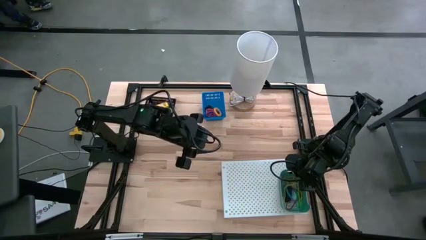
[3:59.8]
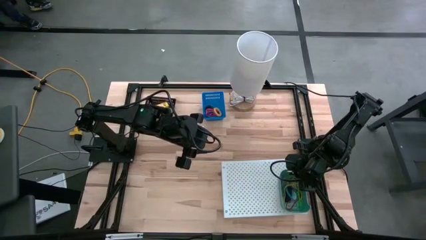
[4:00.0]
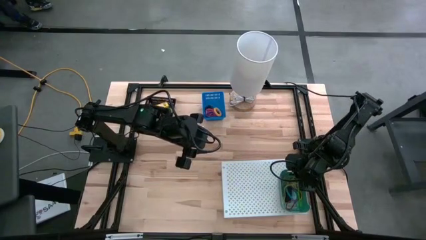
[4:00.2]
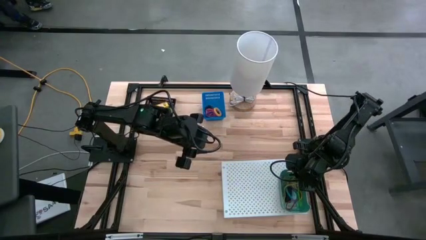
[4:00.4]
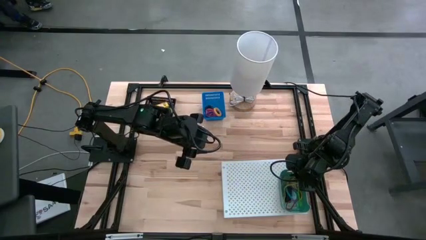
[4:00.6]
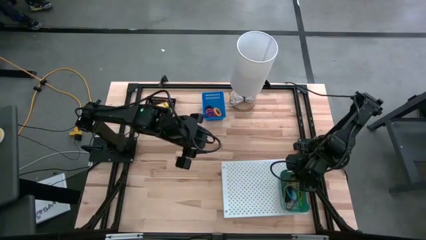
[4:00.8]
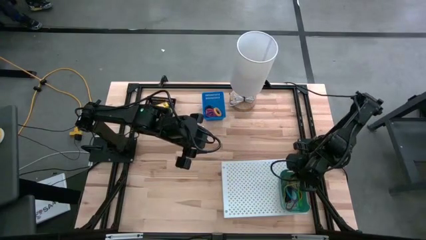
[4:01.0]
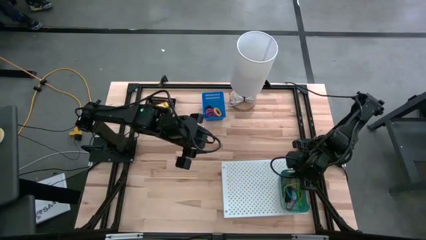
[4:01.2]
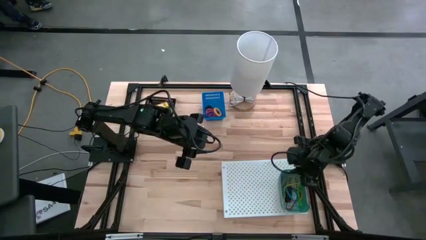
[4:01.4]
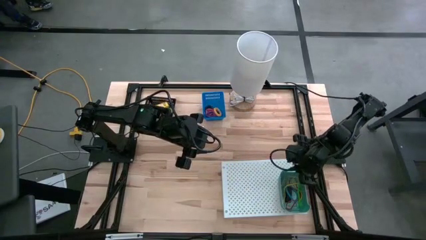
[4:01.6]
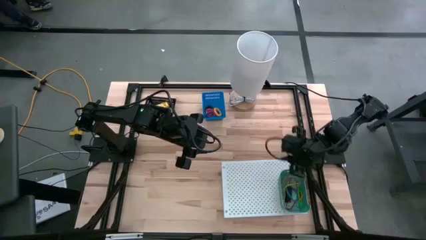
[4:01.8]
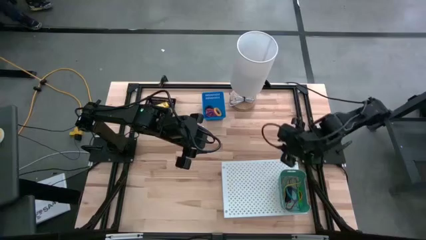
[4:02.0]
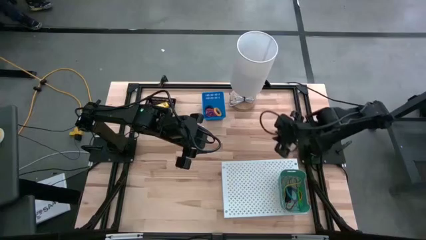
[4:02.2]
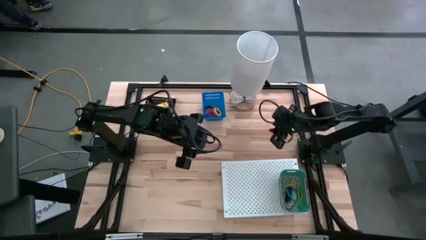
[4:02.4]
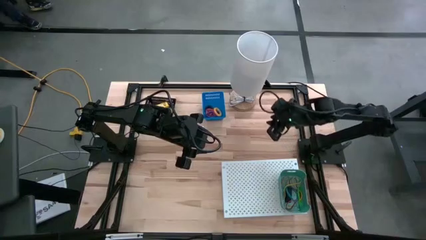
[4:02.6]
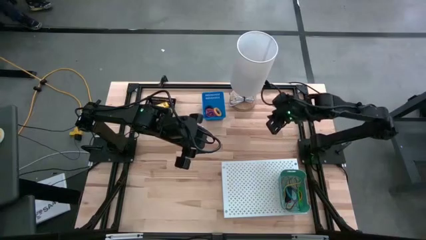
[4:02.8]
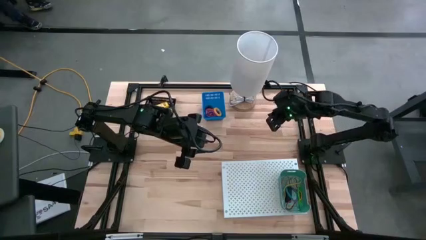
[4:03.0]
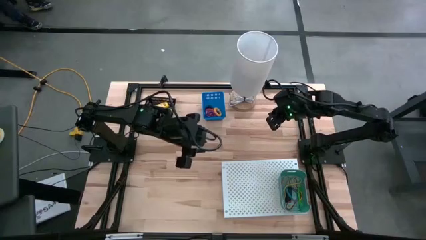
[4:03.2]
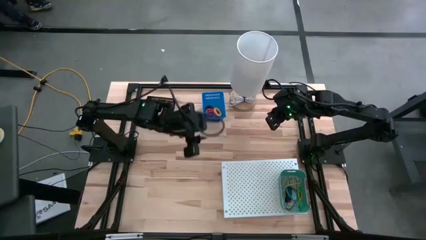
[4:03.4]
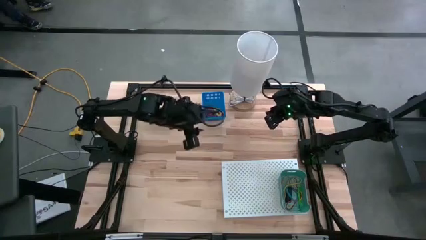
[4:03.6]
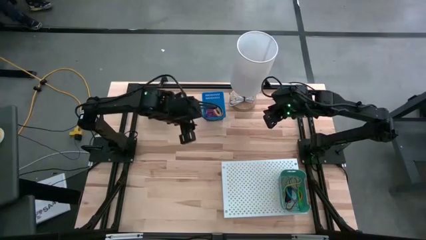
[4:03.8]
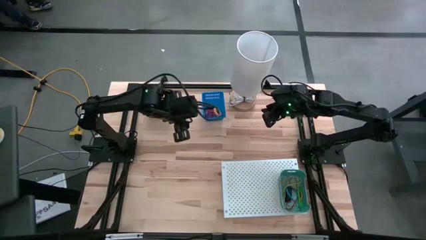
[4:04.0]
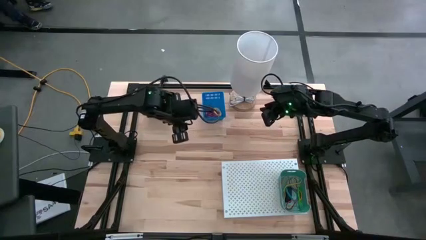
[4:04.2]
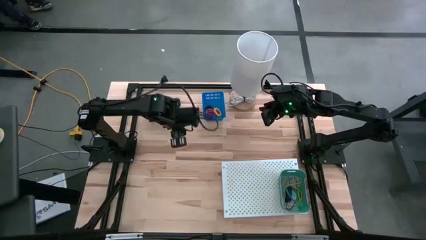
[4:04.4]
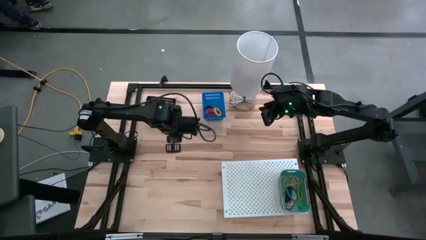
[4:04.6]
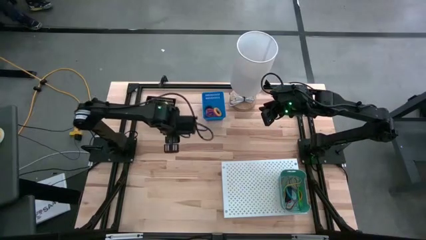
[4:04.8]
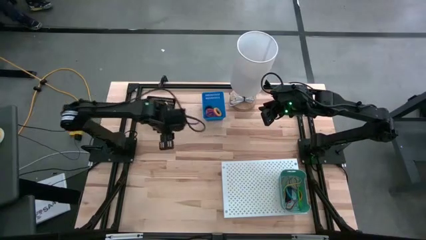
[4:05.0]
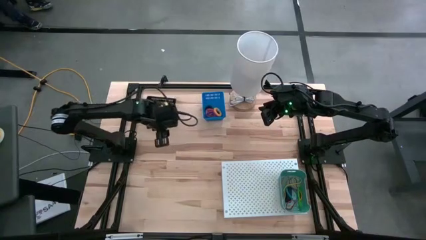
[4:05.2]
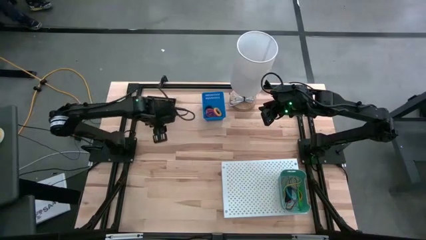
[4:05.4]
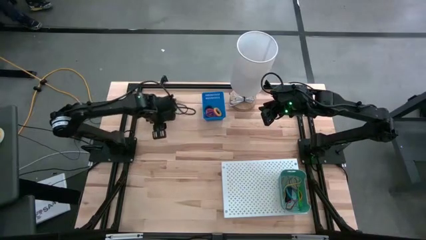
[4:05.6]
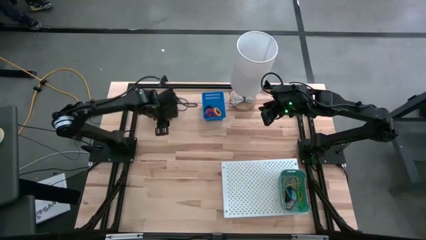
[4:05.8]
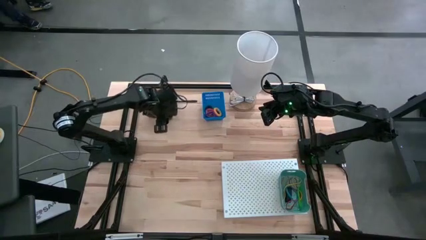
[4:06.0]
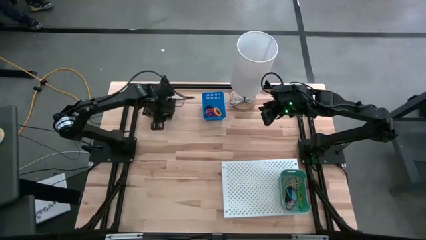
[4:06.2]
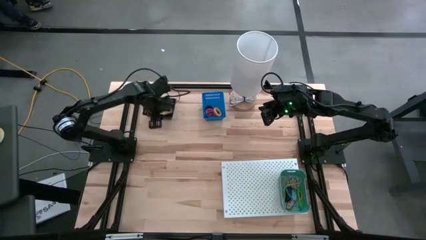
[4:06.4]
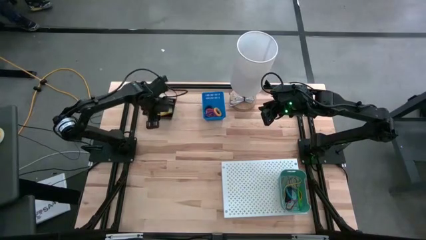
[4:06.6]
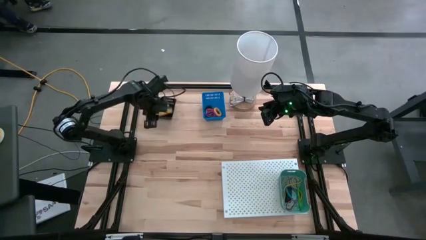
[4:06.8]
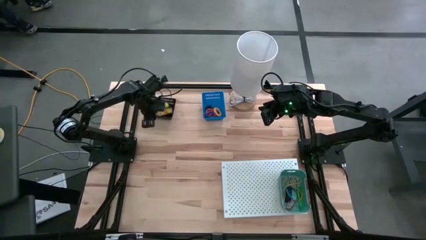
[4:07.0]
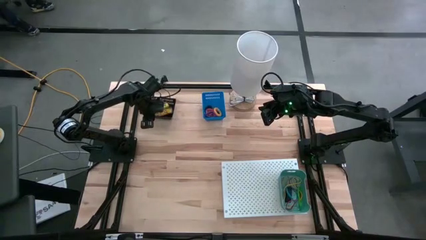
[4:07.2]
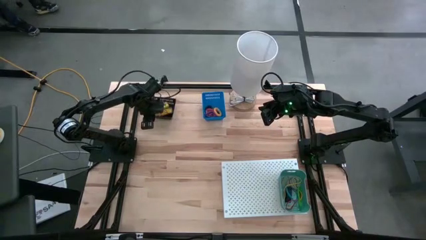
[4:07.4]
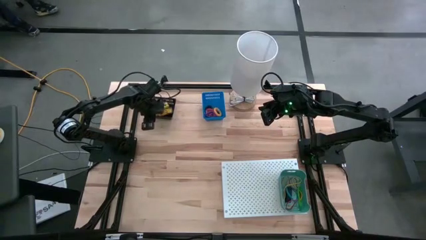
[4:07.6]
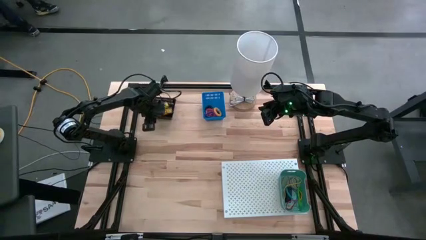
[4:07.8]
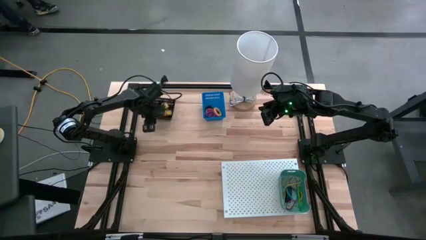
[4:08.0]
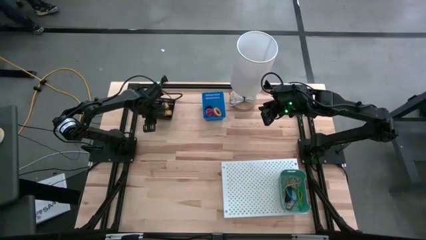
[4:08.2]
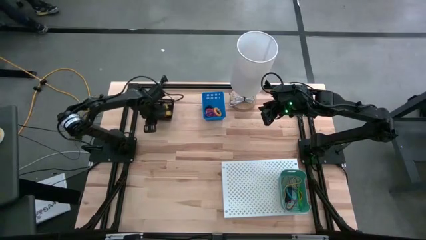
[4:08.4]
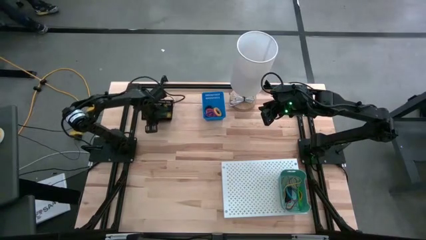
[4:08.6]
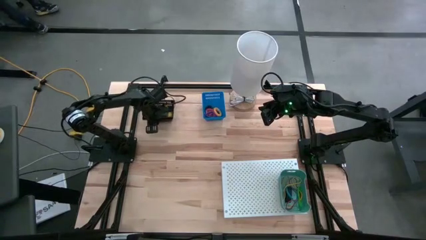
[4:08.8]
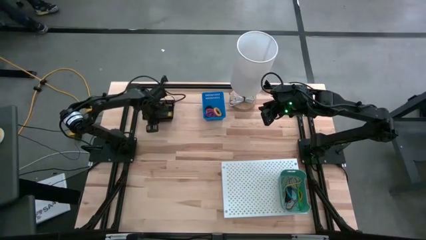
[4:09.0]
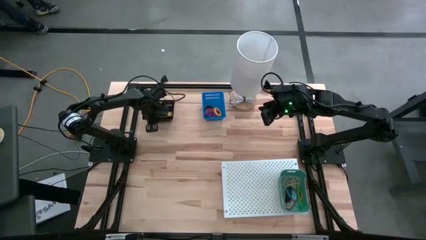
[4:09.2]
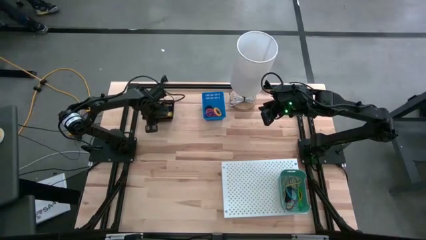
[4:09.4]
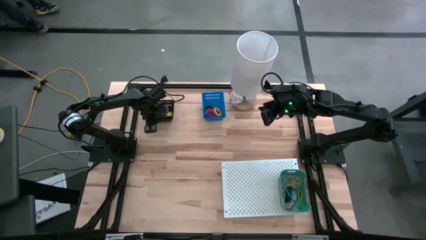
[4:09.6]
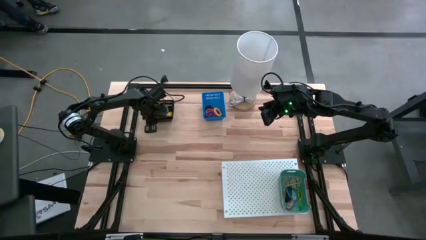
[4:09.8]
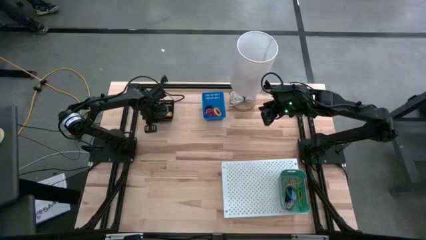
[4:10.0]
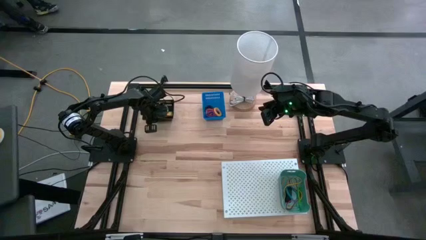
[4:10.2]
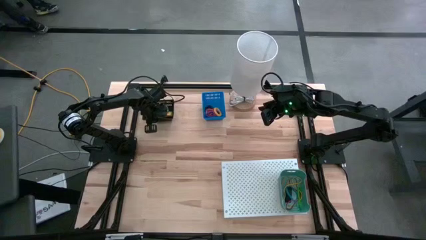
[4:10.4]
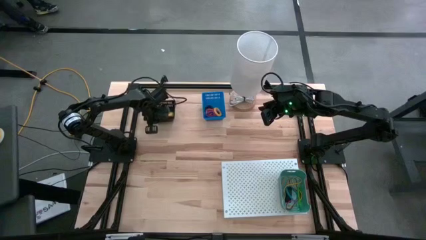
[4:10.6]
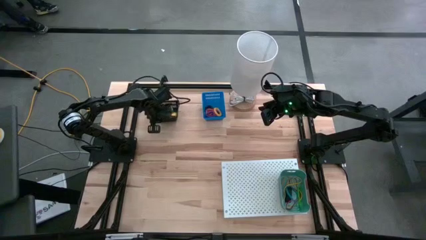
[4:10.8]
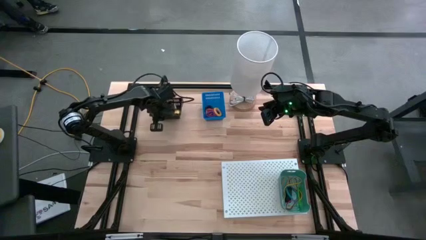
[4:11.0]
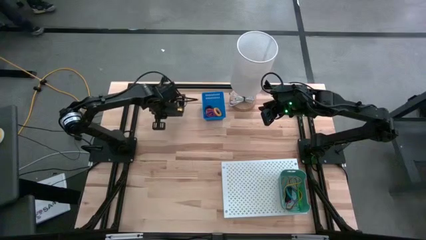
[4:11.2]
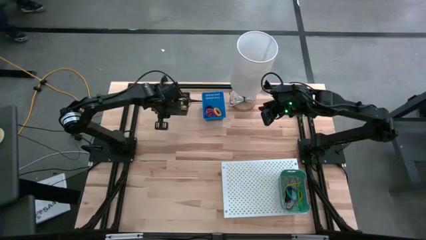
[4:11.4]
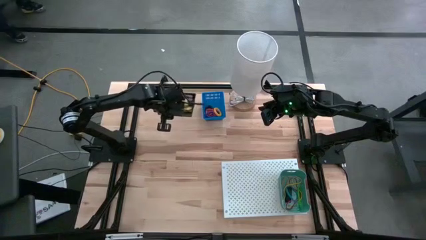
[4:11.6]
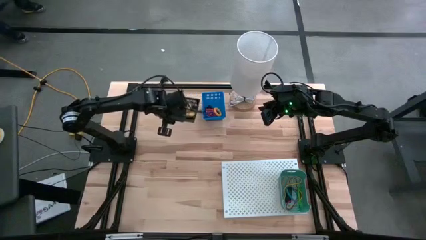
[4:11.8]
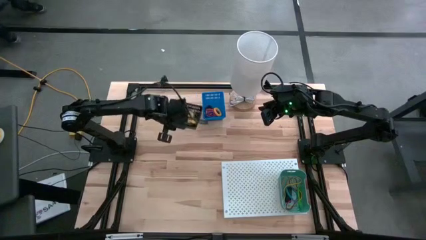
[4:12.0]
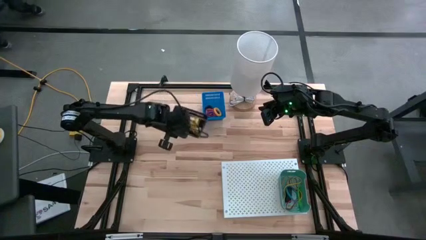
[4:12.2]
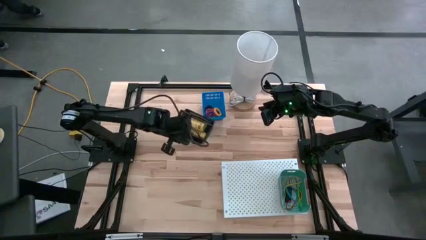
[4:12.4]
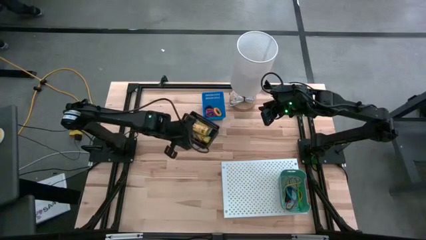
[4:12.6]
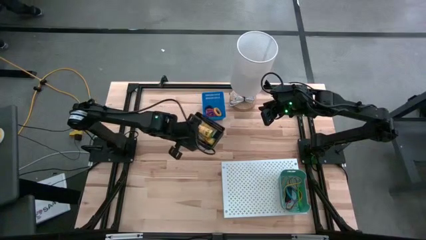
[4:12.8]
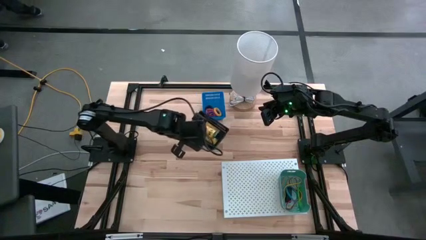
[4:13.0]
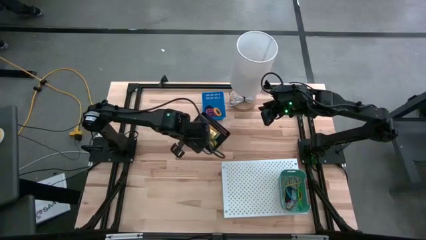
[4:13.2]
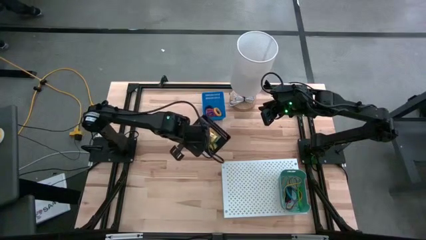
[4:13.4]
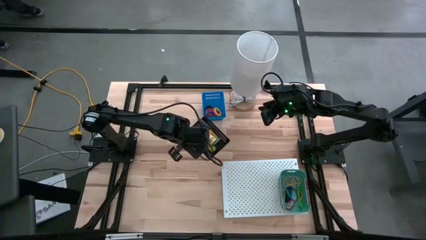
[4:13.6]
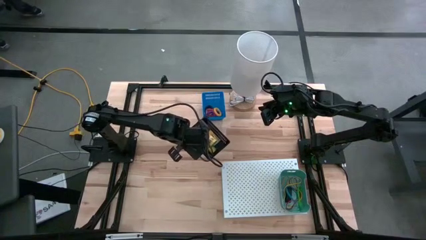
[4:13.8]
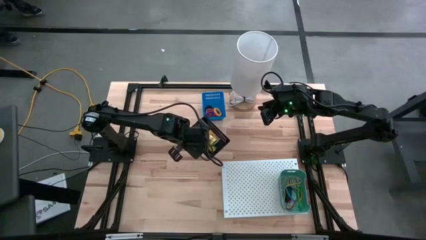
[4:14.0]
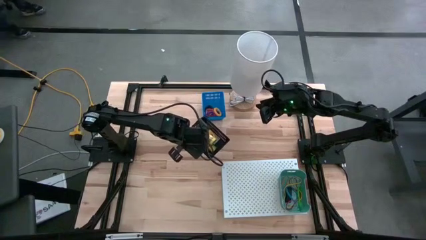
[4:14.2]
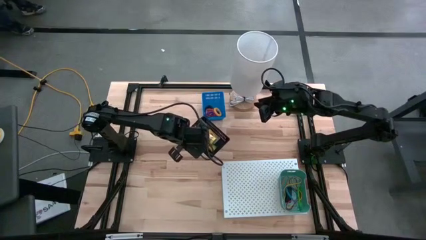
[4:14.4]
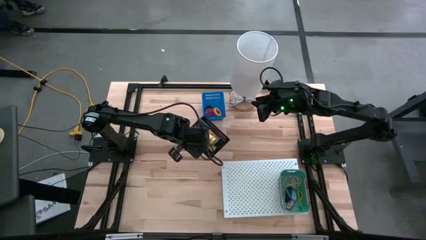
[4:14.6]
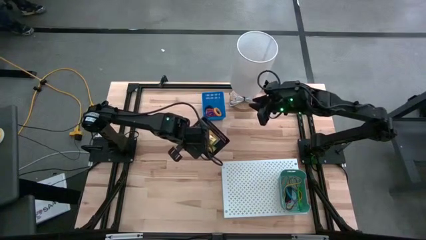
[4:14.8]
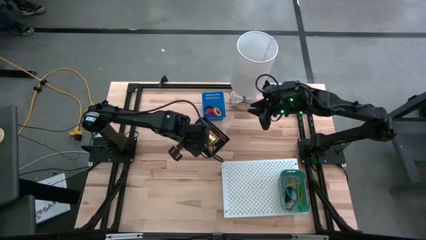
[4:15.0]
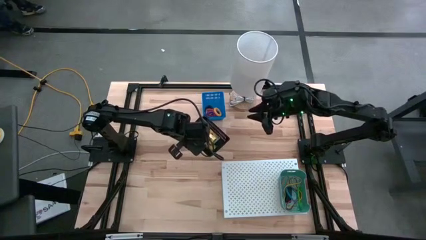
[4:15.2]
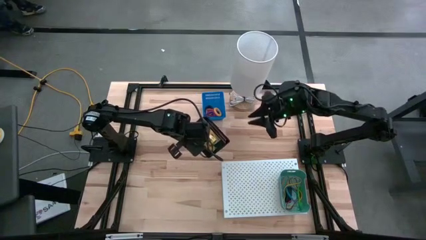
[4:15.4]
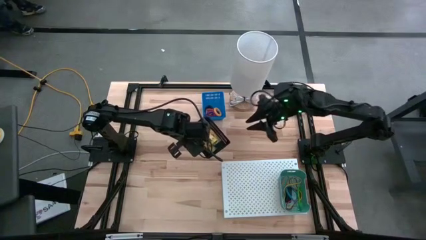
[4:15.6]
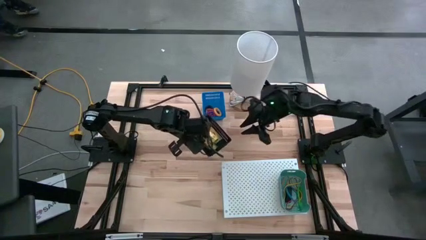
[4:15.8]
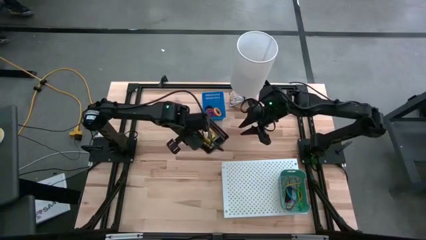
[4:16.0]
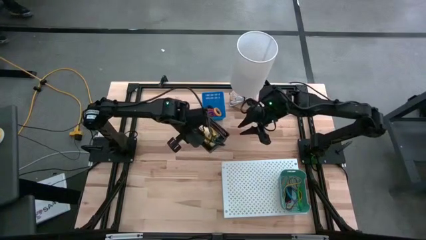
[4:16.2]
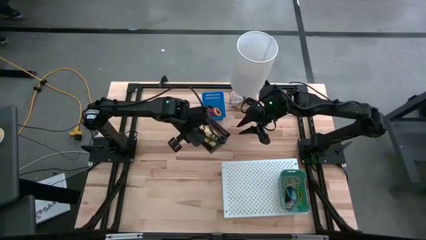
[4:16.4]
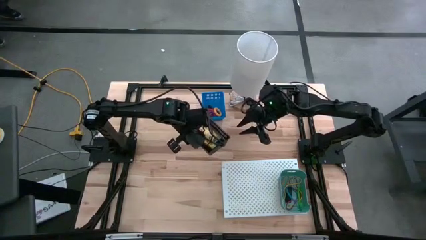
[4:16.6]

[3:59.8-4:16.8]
Task: Pick & Place Office Desk Supplies
Put the black bin with the crayon boxes on the shelf
